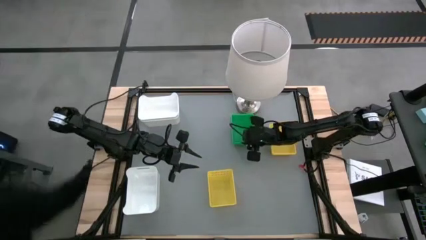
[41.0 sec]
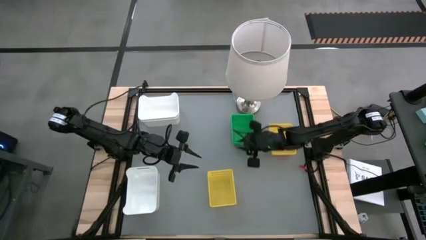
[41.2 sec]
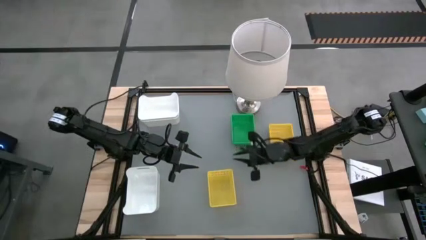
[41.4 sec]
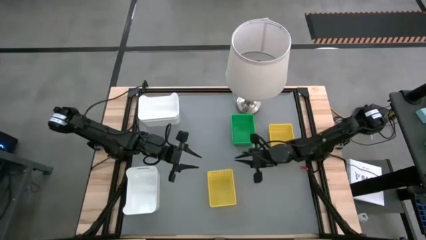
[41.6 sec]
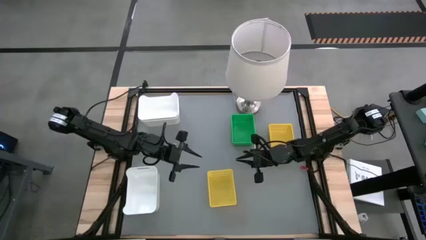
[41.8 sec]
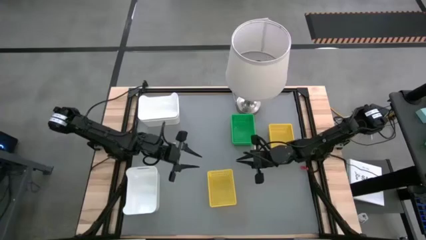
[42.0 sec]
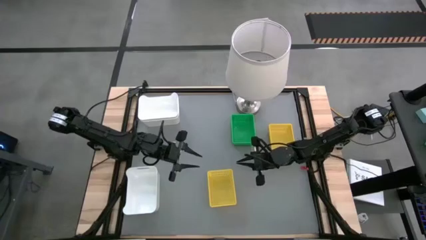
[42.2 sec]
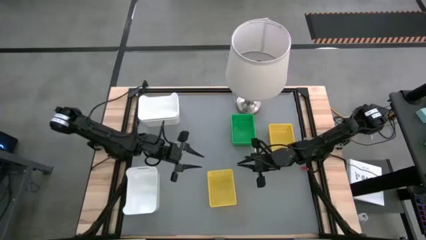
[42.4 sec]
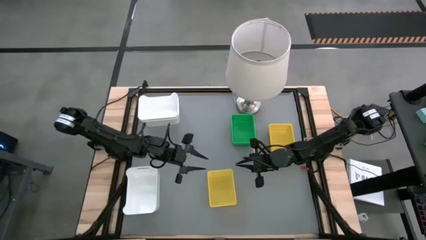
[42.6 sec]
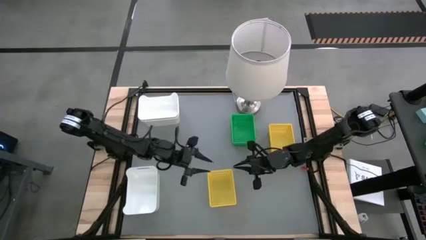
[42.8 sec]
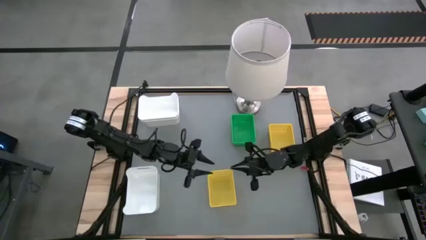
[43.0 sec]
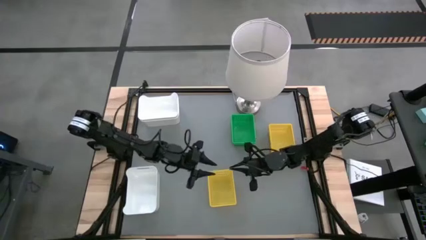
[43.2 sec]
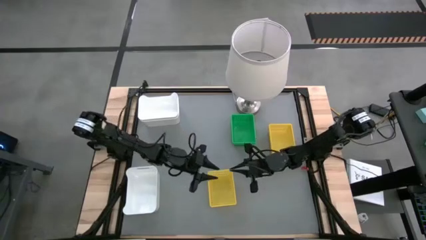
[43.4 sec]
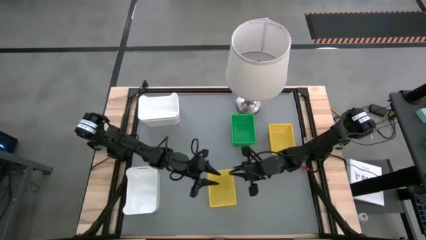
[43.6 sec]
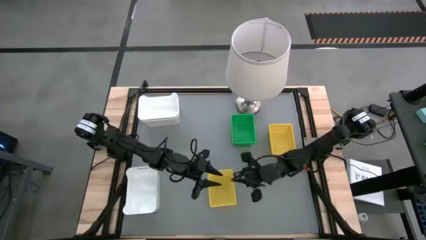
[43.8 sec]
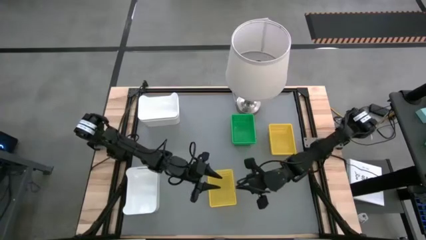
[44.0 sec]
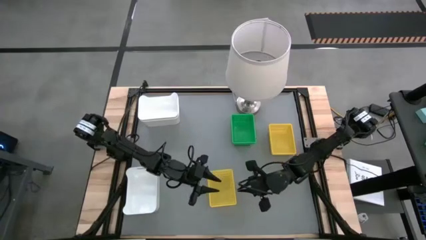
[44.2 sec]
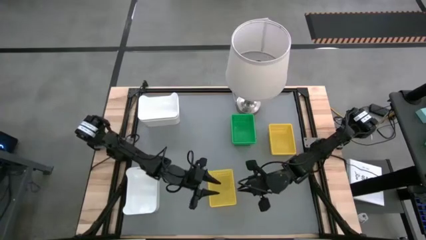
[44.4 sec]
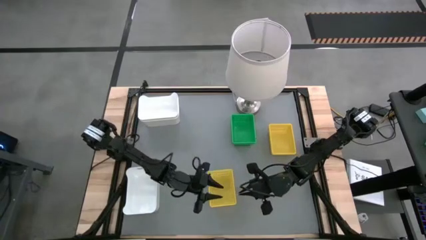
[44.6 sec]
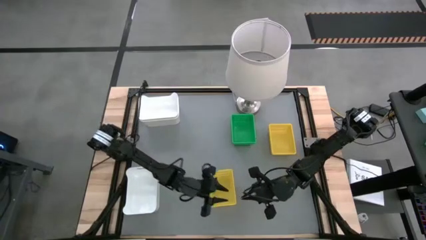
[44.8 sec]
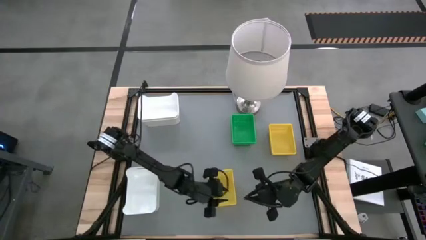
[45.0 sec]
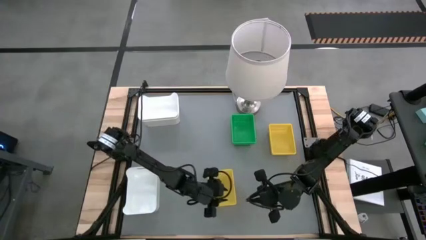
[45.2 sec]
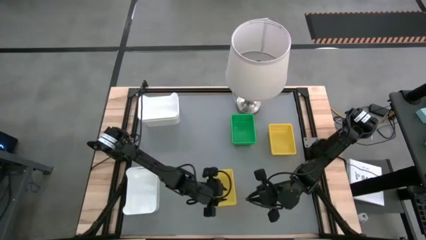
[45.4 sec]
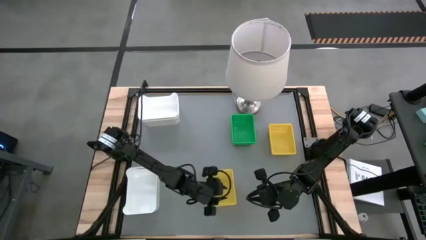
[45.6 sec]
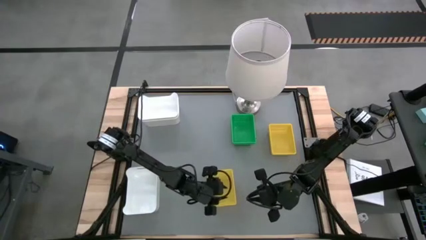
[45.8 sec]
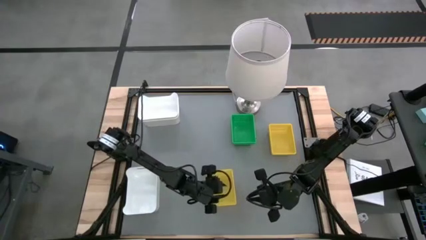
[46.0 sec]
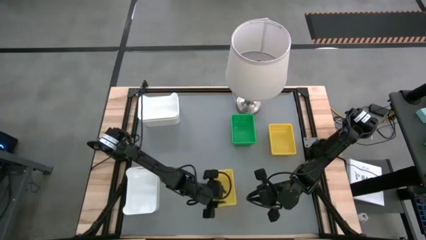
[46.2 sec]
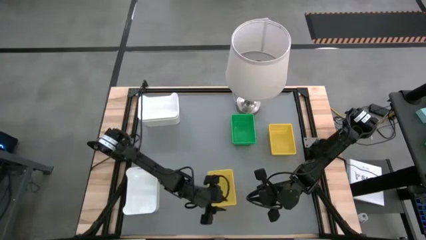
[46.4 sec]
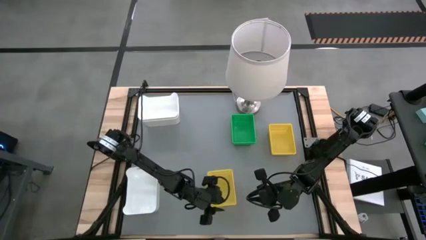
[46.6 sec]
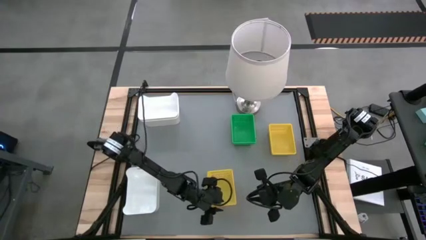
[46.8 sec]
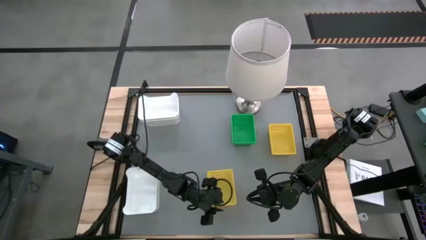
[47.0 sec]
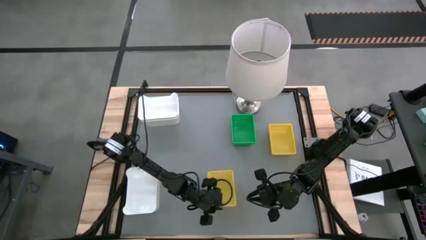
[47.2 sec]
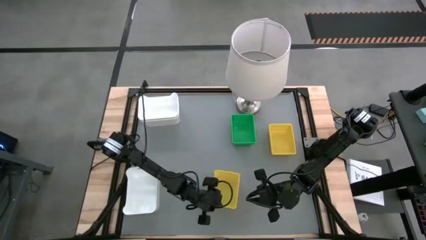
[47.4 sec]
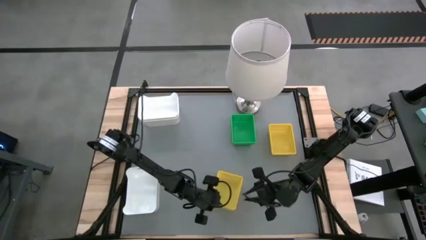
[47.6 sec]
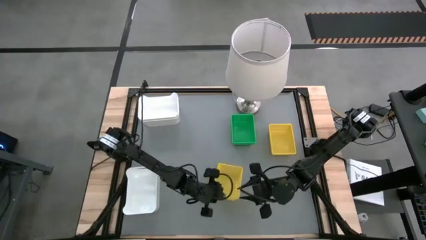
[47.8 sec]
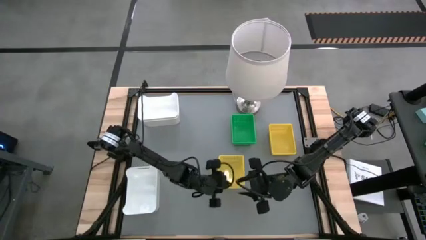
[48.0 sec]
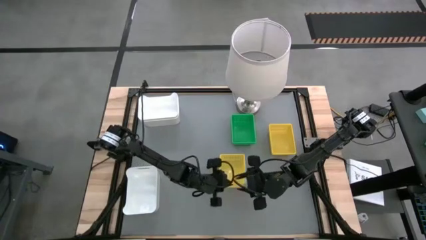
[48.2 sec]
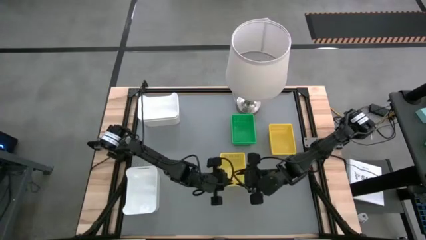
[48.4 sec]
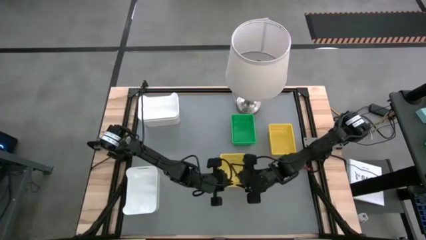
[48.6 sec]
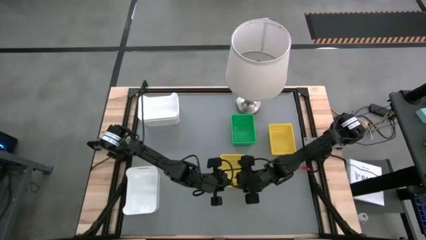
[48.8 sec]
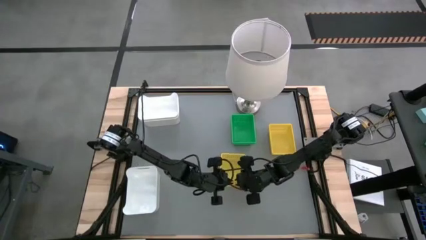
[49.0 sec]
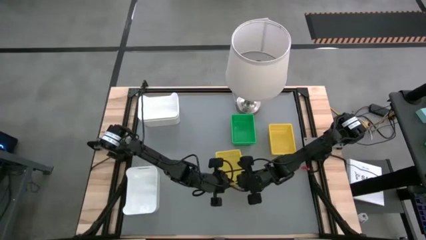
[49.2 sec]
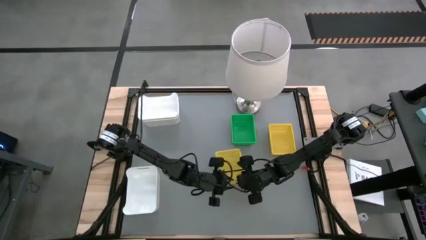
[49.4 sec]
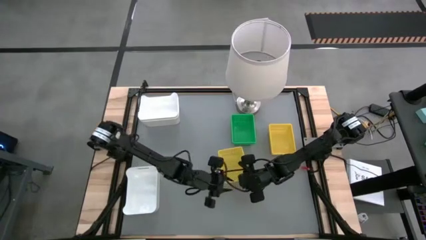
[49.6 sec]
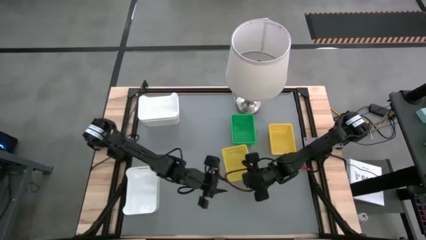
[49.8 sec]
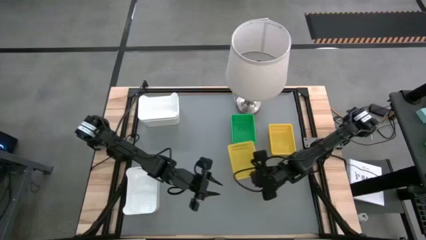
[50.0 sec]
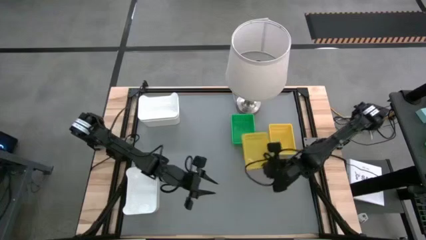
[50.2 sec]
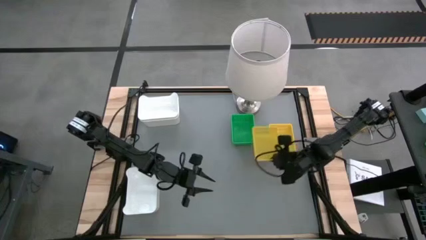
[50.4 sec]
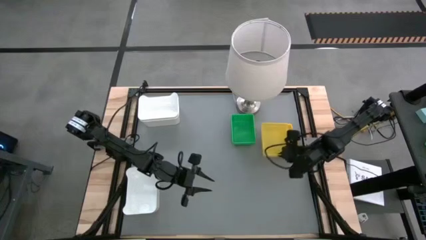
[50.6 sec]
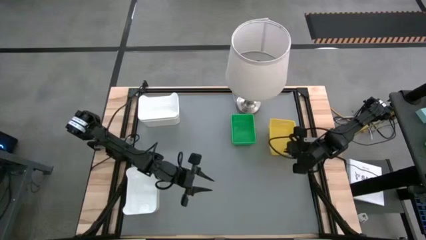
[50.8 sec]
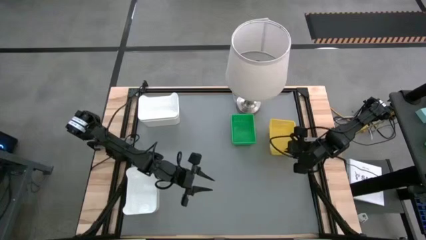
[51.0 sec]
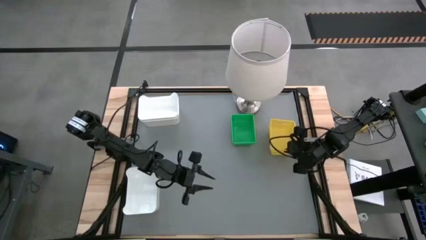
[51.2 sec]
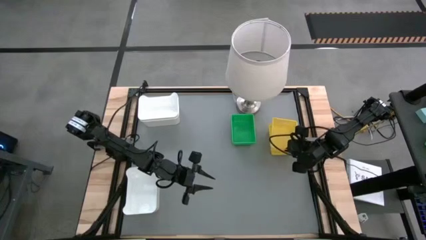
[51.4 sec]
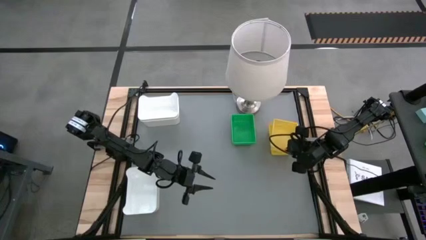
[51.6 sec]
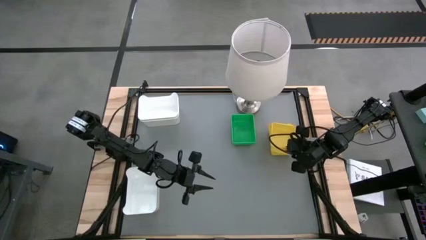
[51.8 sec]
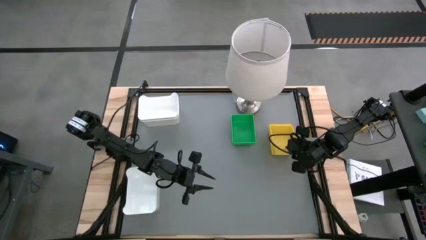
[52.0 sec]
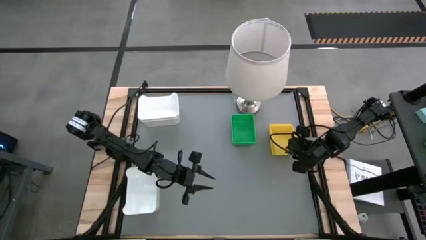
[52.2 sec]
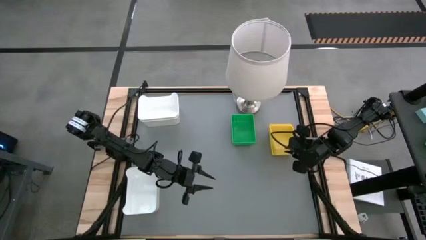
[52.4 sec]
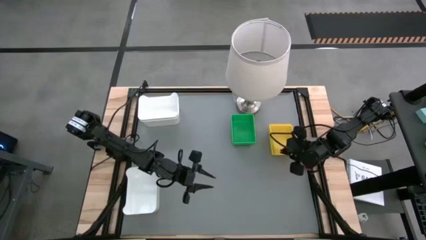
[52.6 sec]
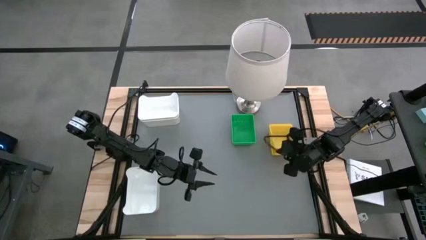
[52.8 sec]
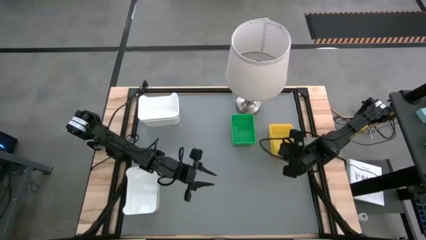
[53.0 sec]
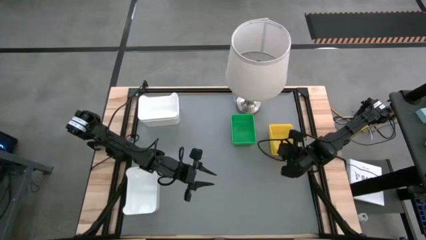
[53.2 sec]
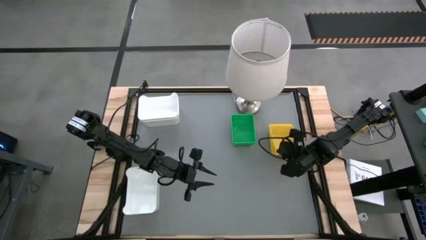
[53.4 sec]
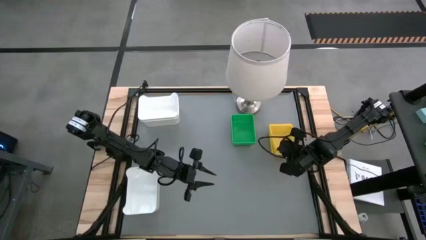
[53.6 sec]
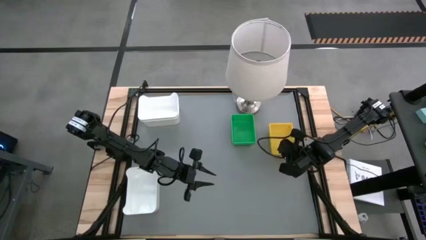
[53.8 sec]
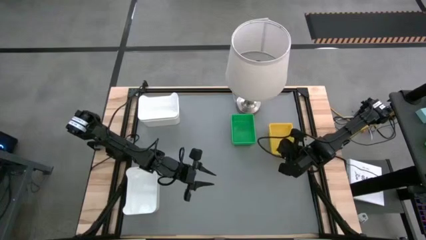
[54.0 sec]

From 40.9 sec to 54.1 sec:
Stack the bottom yellow bin on the yellow bin

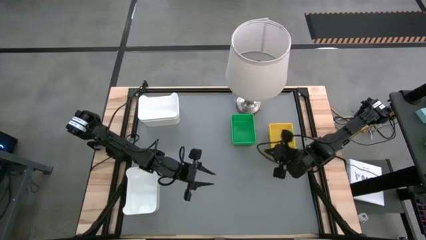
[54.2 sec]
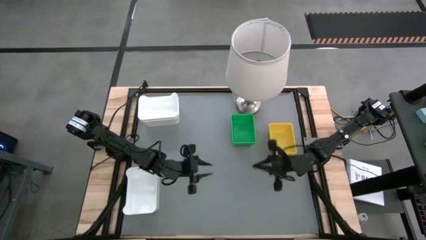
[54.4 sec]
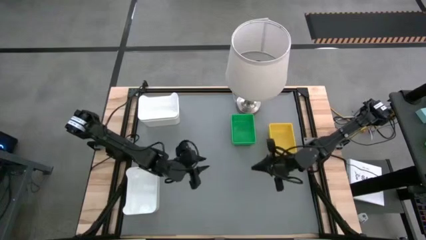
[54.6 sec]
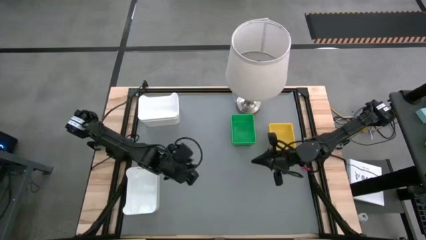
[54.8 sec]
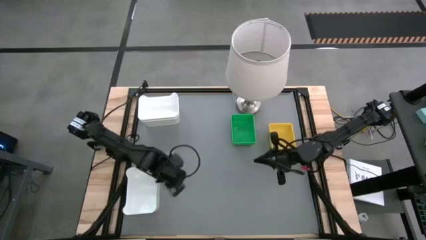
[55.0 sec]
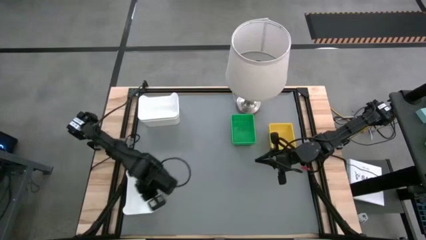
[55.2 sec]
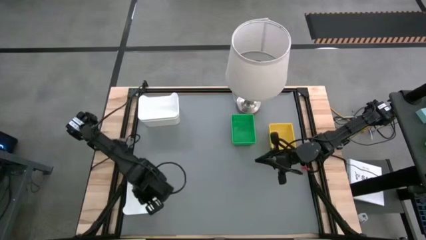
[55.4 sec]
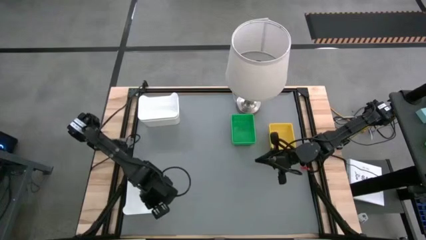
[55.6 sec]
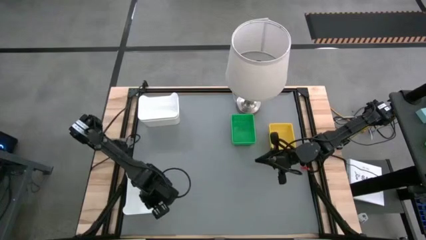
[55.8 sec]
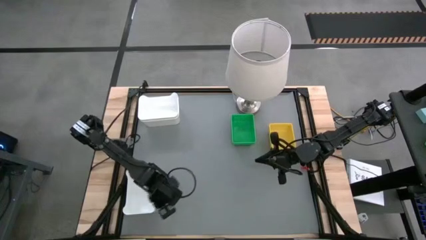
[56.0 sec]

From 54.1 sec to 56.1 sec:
Stack the bottom white bin on the white bins
